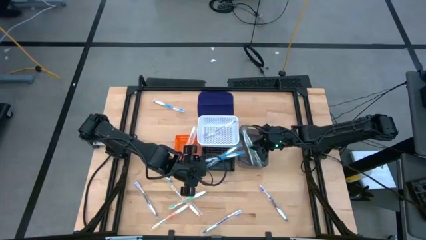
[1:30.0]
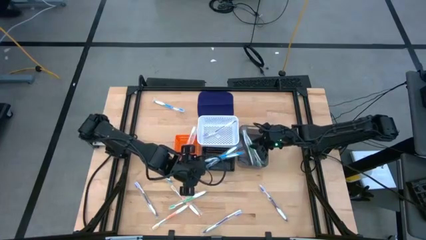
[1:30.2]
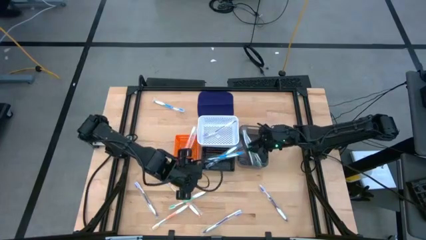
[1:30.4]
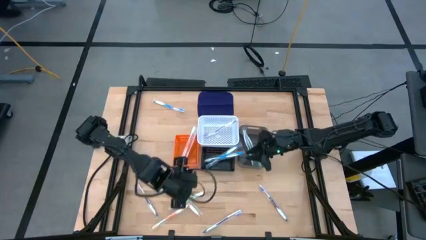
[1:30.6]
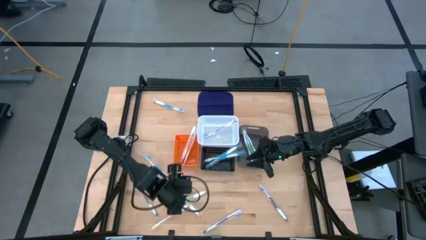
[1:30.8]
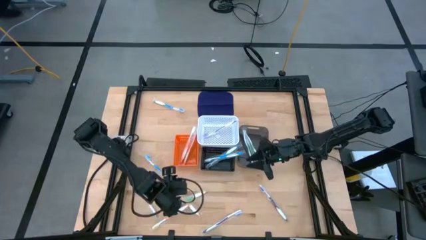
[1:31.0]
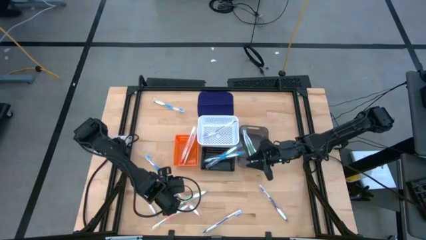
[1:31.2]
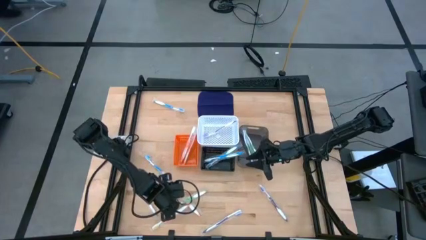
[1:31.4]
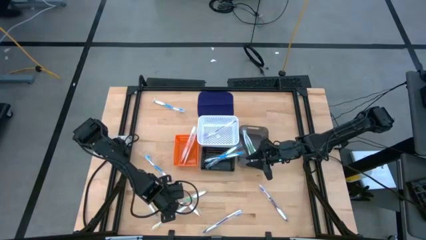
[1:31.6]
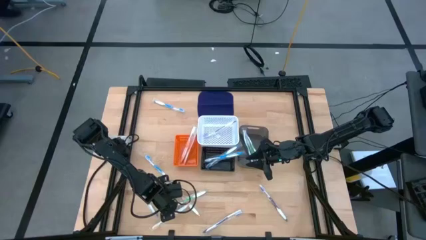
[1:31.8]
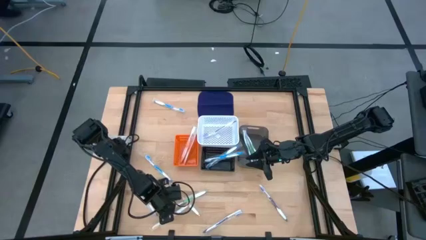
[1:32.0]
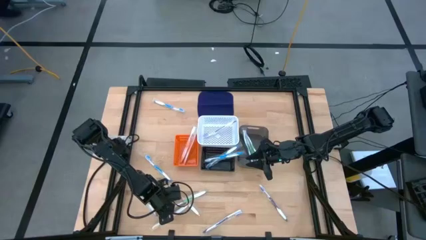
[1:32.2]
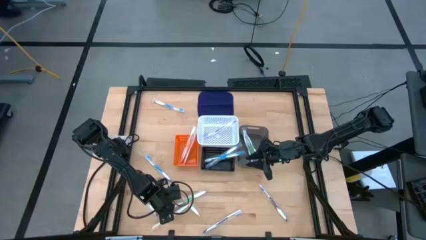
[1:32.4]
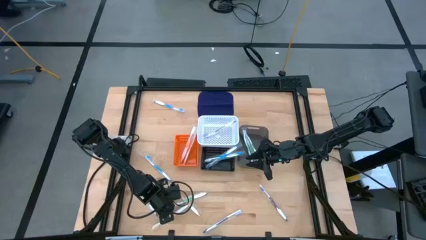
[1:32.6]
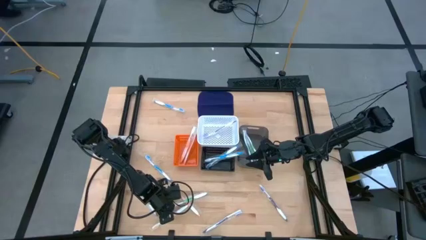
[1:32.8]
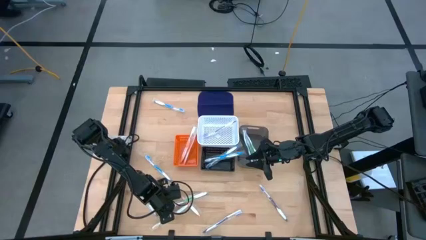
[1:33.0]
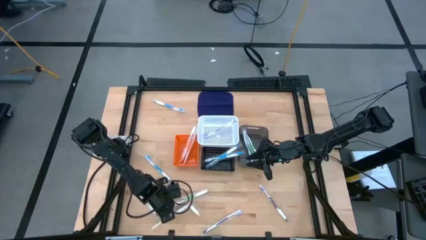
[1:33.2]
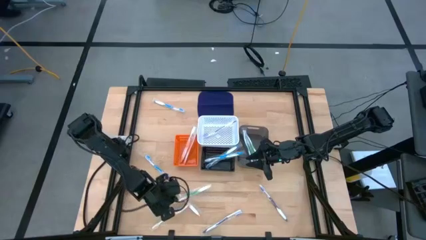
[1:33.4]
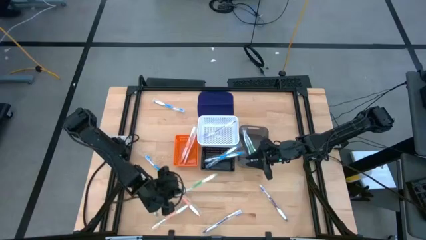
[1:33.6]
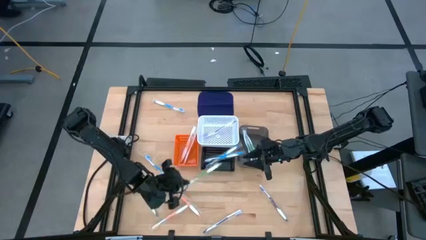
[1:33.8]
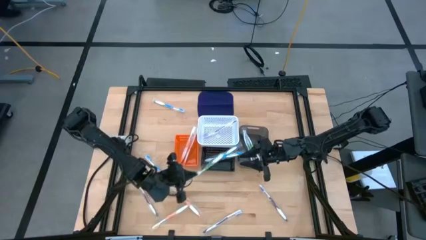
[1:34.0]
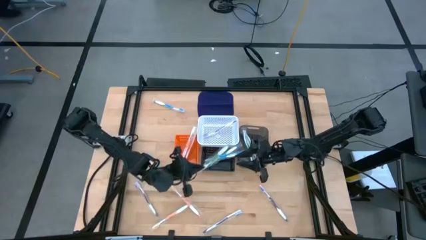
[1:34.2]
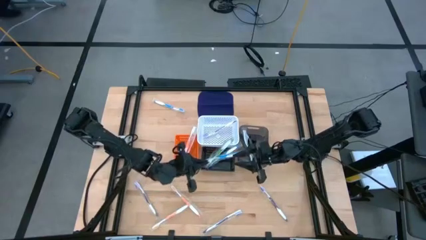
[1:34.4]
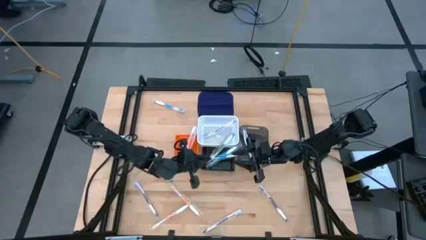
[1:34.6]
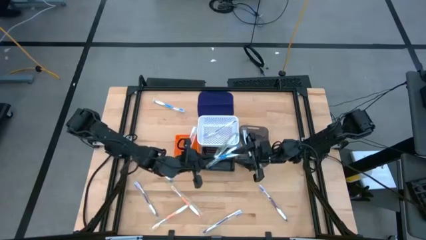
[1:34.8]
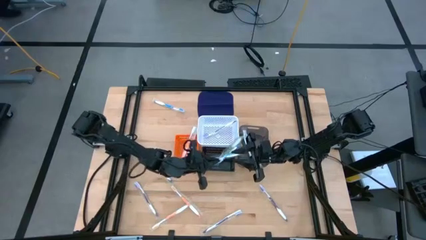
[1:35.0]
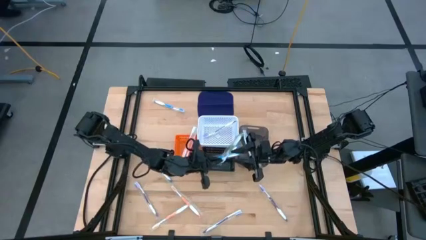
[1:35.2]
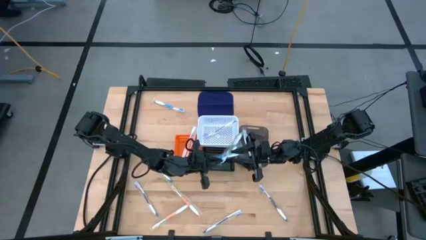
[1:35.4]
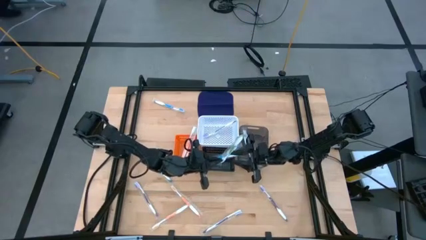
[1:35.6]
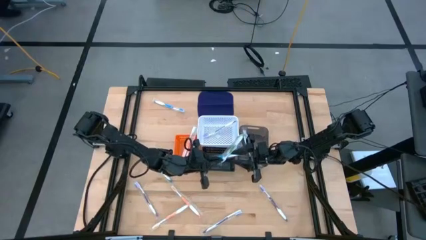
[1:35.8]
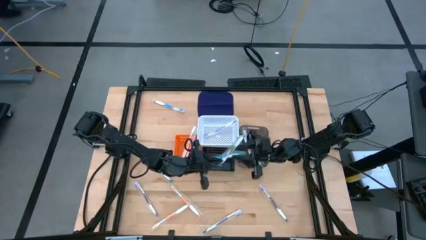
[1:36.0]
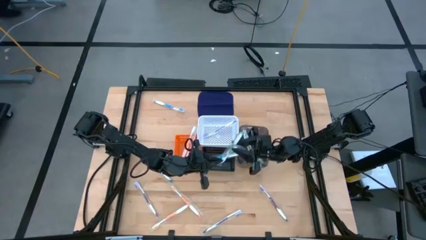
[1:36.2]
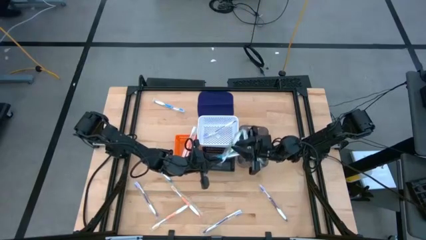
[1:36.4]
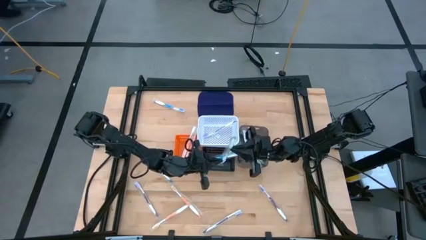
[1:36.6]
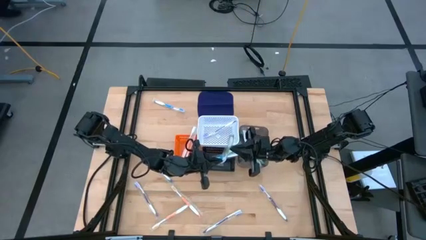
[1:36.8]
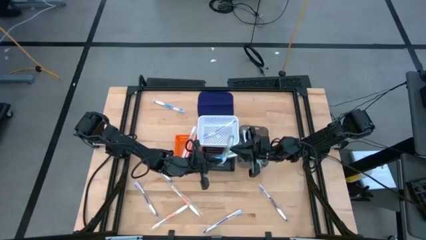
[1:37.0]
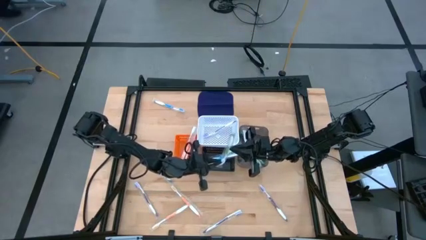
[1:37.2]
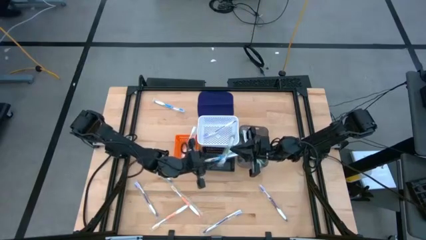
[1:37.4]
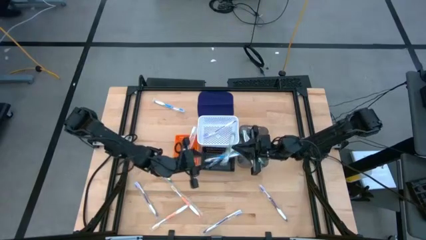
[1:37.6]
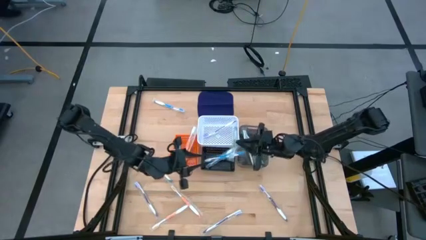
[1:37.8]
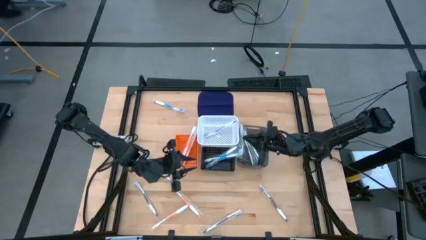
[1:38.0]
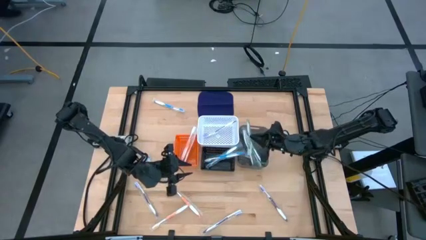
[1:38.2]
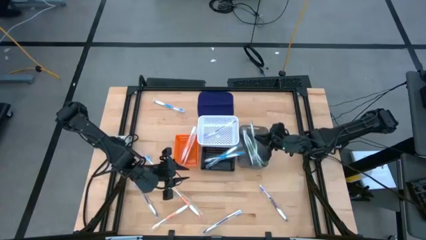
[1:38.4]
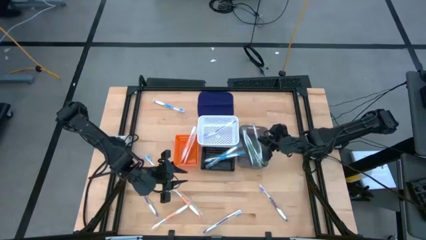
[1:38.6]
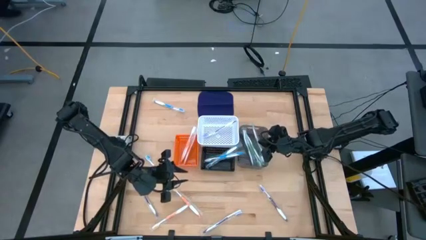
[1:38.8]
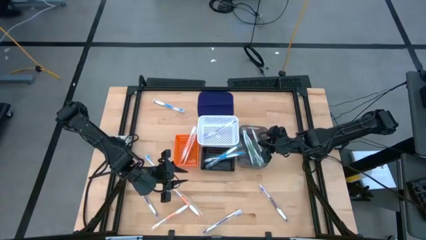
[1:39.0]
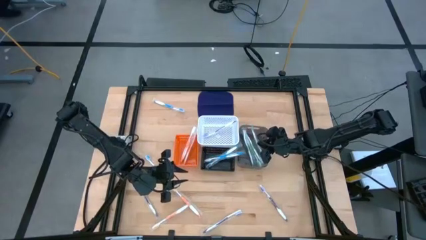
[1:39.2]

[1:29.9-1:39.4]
Task: Pick & Place Toothbrushes
Put the green toothbrush into the black bin

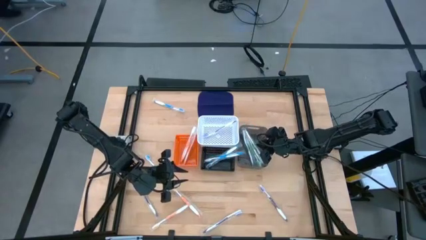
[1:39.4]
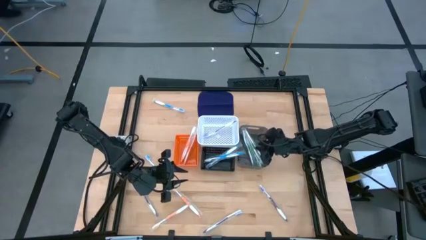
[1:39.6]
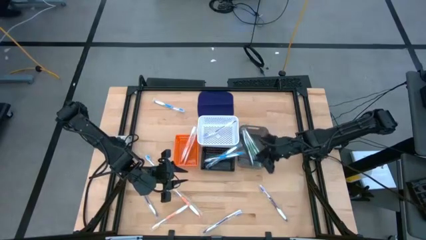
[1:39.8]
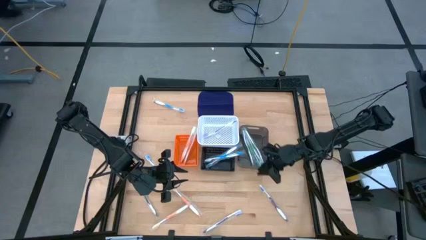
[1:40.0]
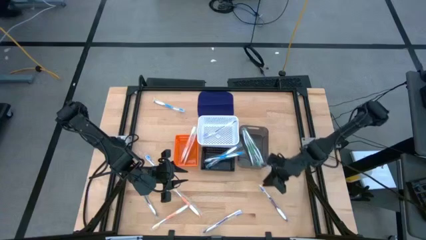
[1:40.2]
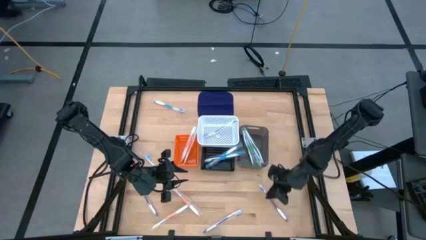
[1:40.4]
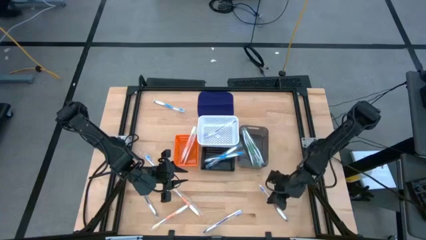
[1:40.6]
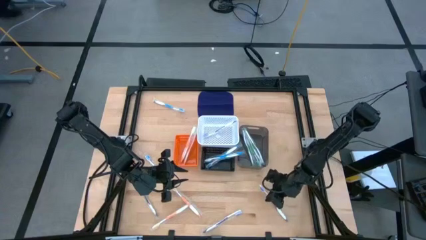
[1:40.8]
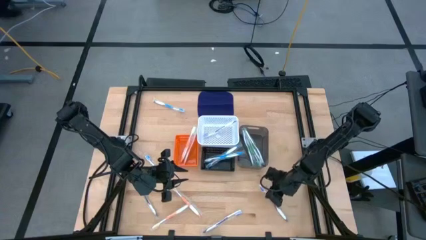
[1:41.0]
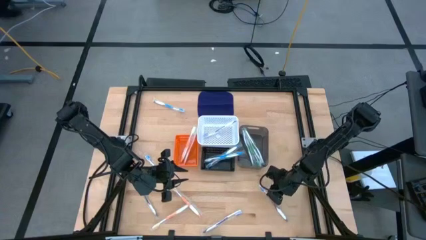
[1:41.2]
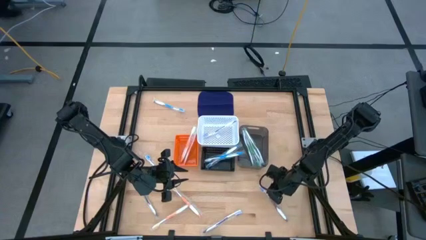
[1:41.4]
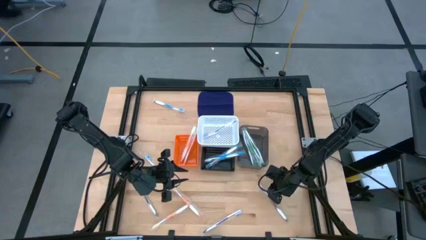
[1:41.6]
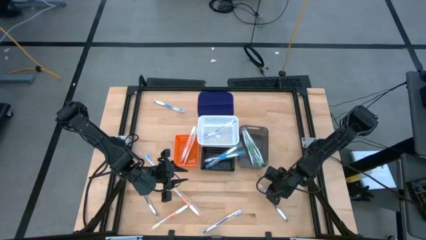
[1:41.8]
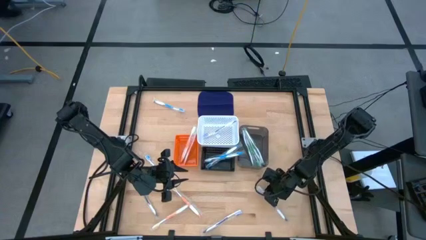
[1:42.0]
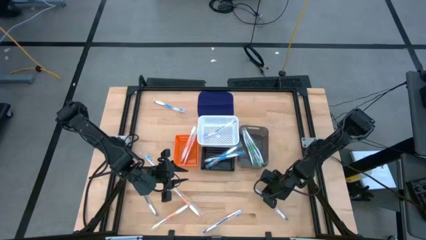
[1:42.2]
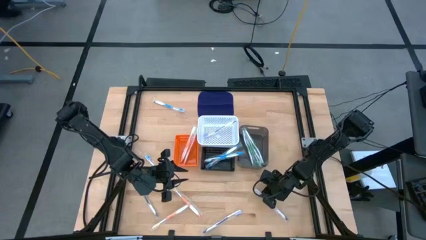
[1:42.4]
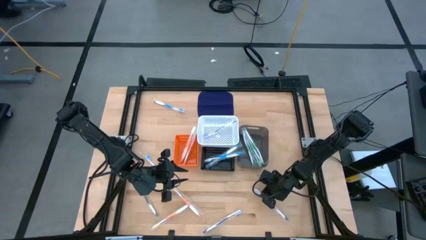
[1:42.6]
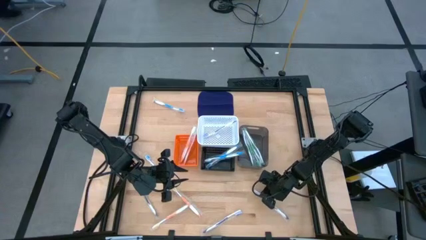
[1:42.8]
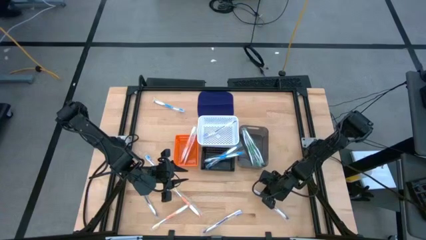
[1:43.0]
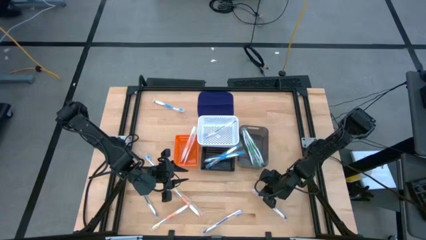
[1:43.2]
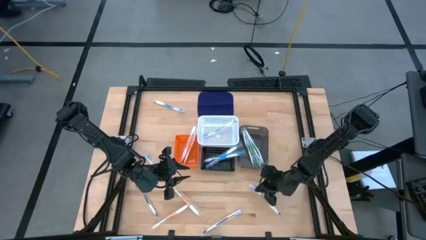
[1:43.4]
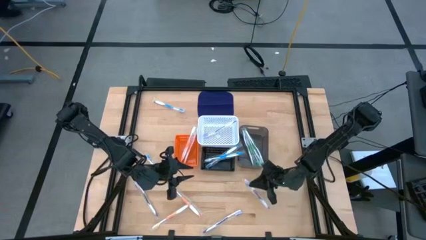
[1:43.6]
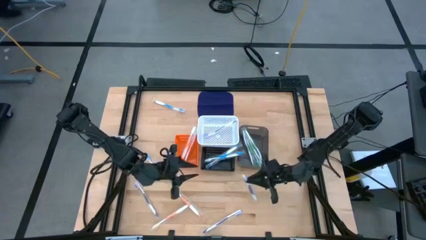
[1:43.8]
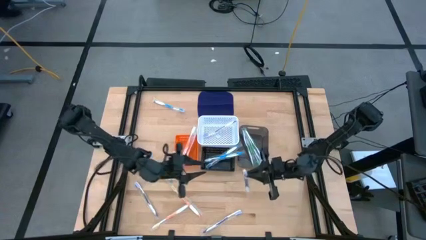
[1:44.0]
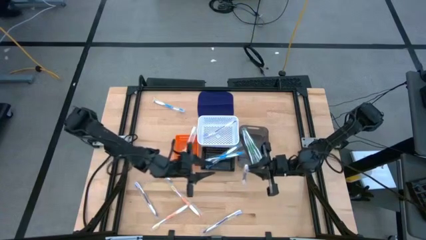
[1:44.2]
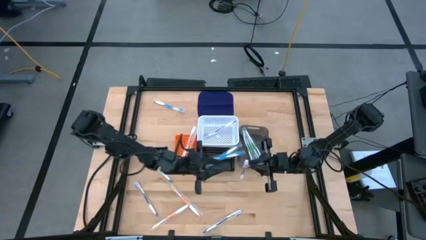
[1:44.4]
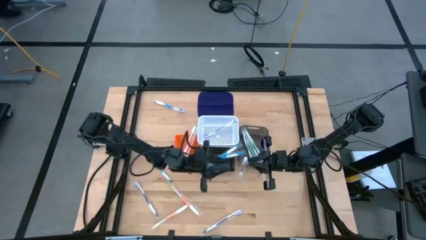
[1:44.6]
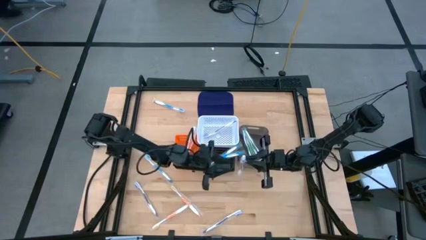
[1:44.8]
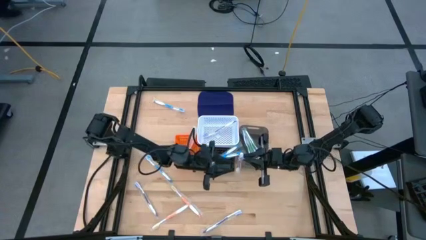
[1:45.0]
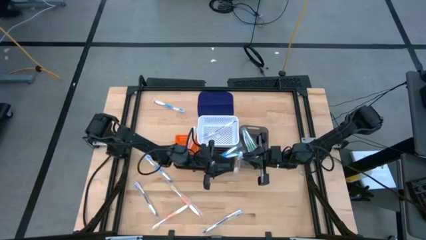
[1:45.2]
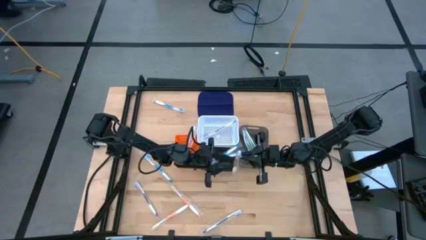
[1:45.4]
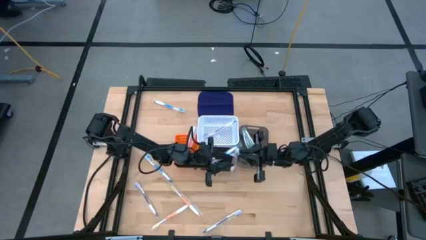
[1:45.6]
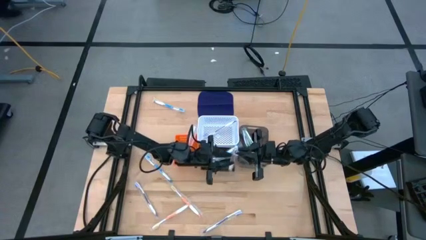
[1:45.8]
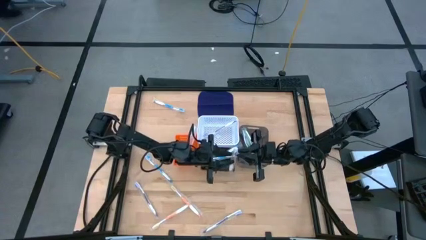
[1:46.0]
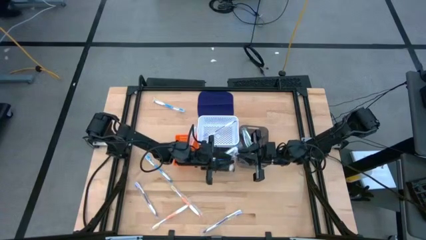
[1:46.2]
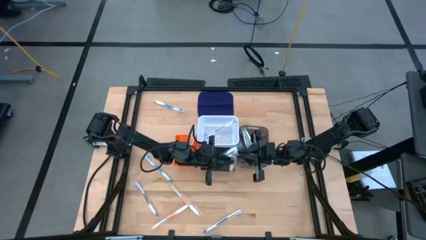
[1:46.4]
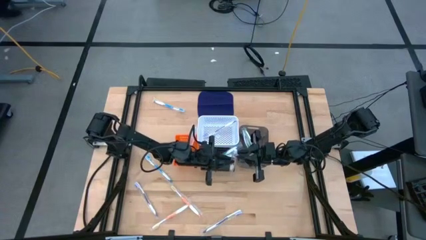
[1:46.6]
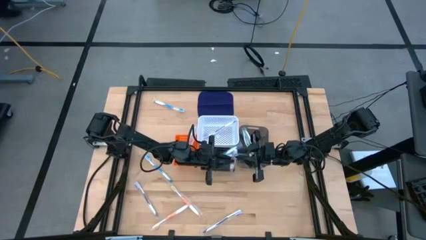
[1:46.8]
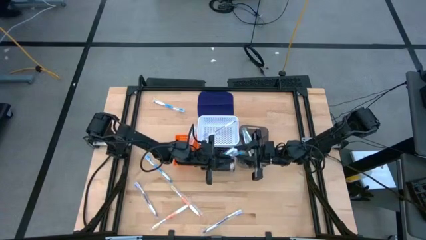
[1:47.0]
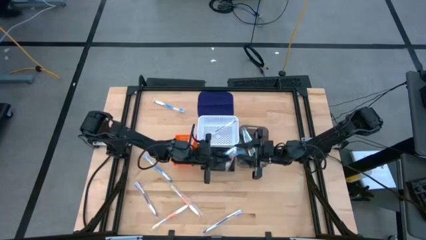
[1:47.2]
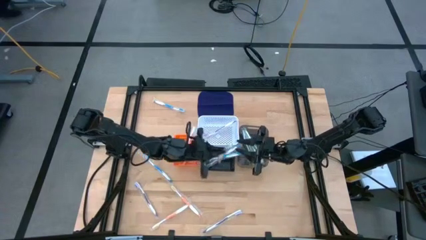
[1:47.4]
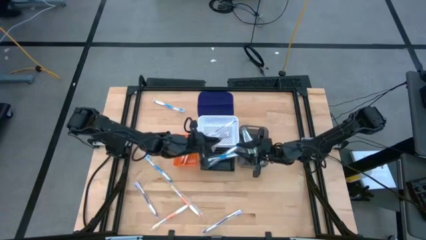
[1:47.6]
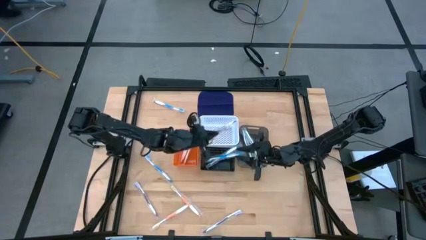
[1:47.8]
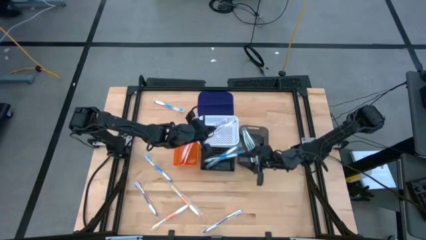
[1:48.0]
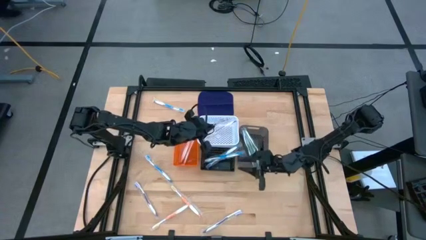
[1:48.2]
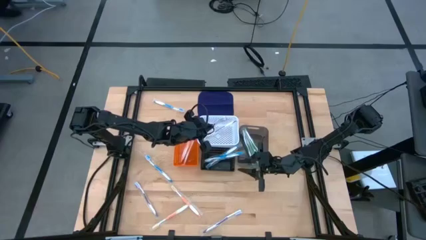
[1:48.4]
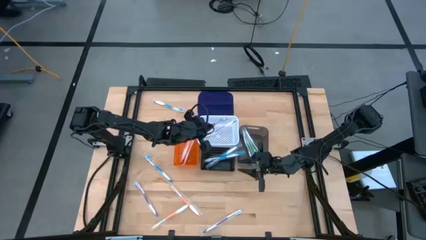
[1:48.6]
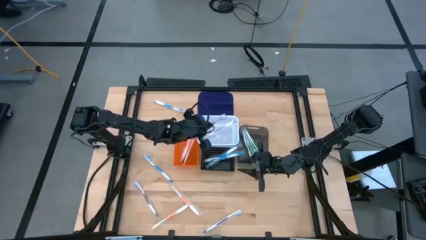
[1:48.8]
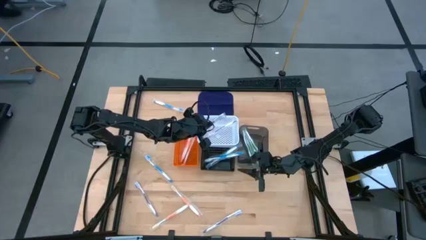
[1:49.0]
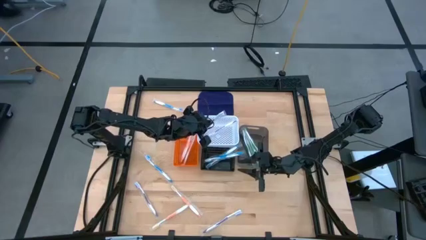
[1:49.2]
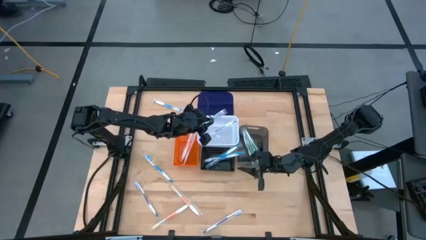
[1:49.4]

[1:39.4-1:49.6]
Put the purple toothbrush into the white basket
